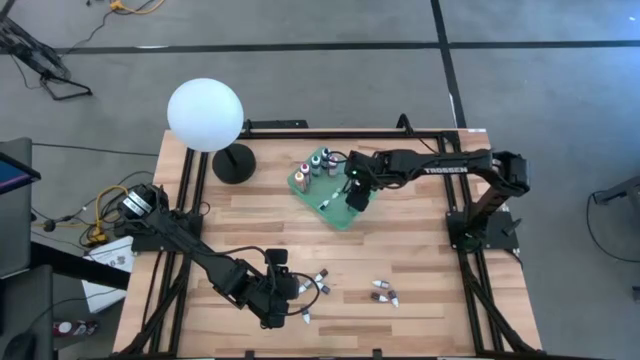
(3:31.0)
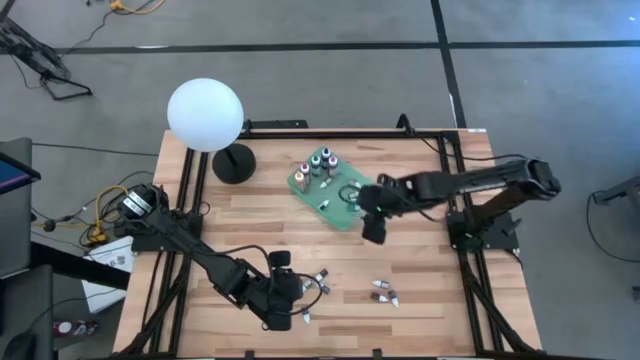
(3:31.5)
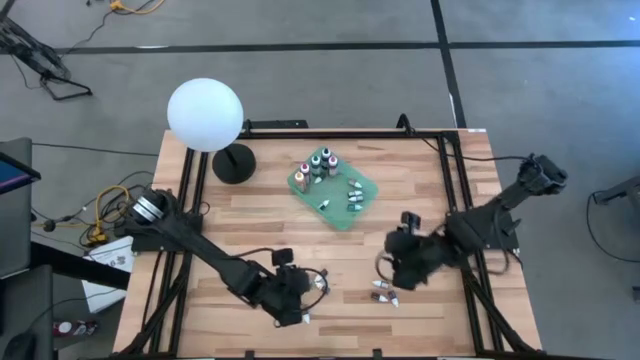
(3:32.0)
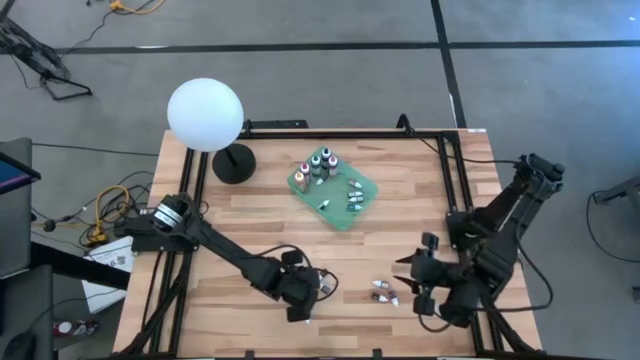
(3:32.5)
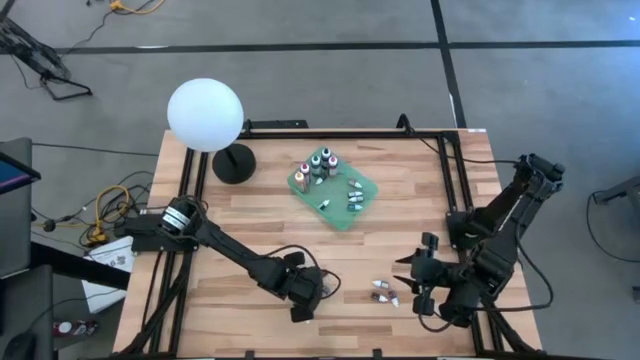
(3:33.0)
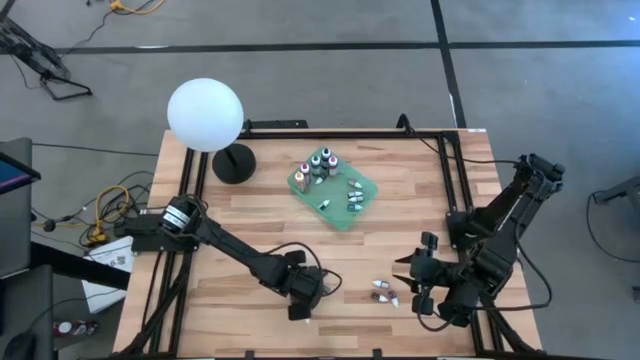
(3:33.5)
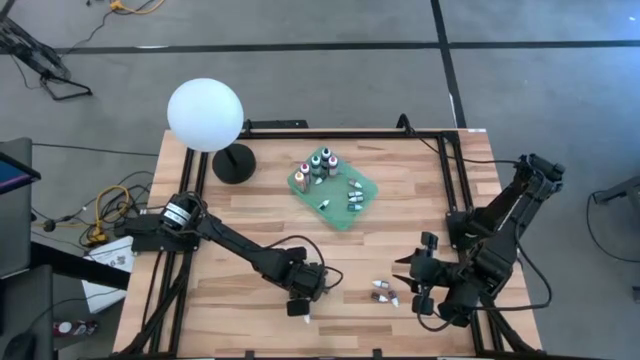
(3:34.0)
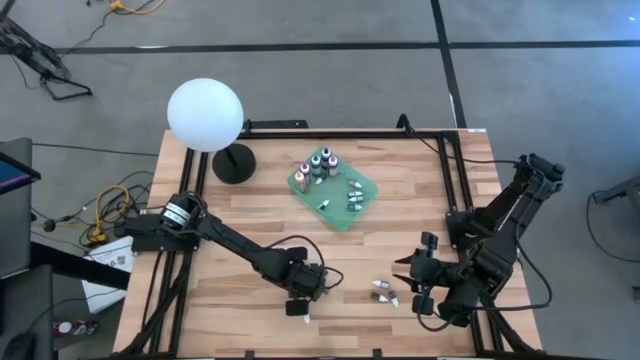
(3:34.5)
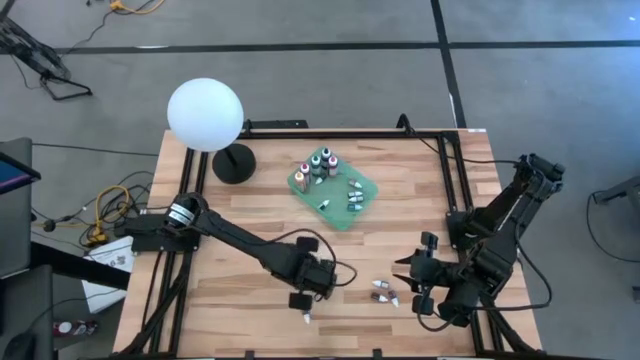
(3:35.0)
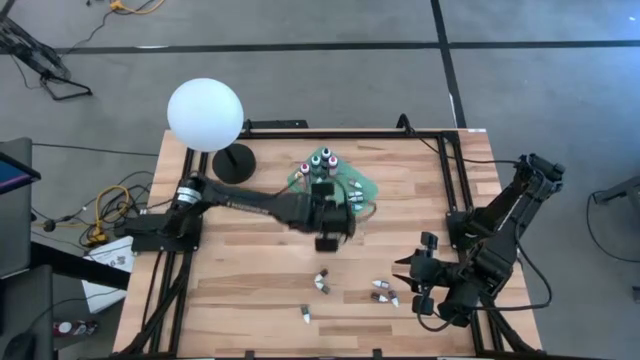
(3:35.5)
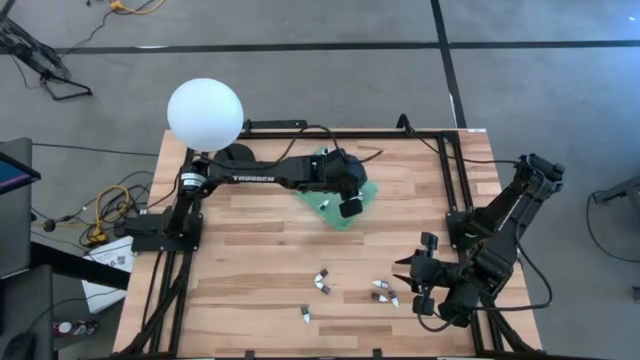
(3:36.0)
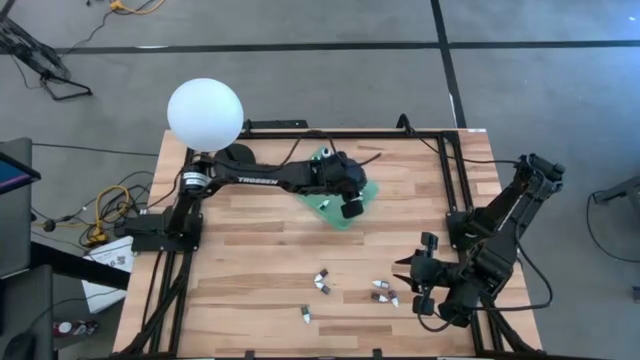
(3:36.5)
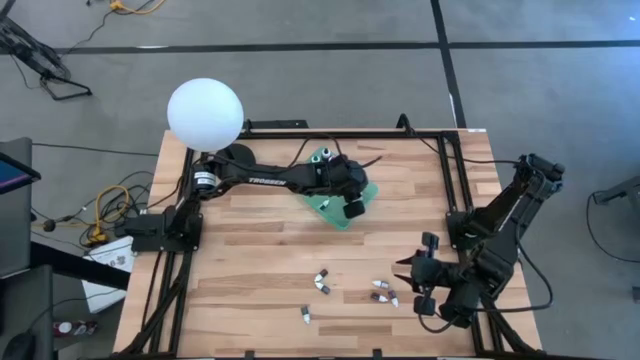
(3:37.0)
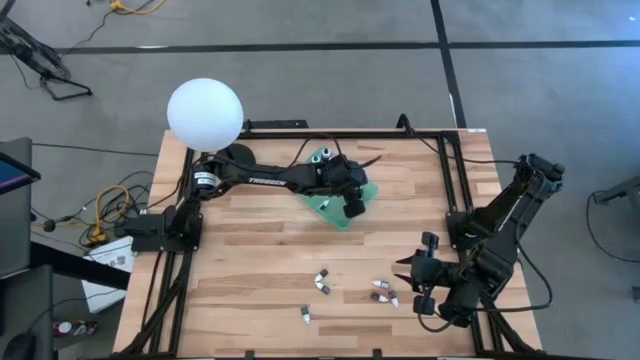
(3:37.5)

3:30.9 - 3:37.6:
Task: Pick & Place food coloring
Put the small green food coloring bottle into the green bin

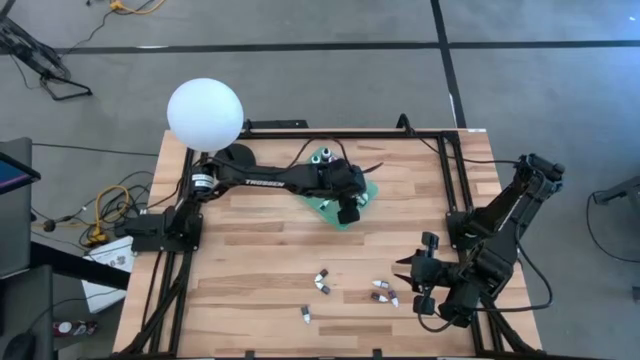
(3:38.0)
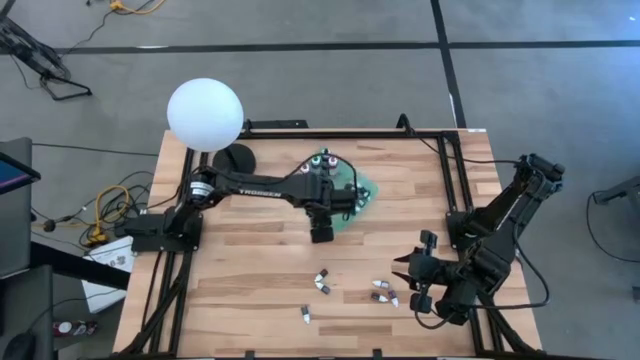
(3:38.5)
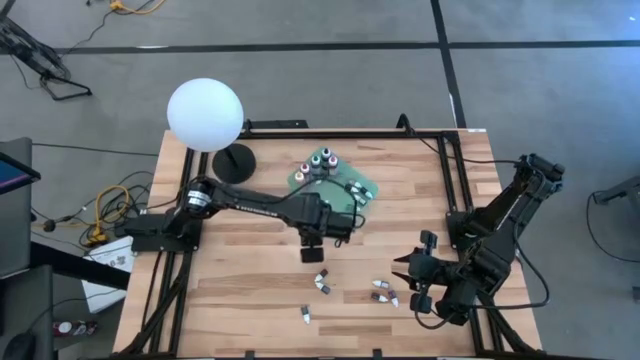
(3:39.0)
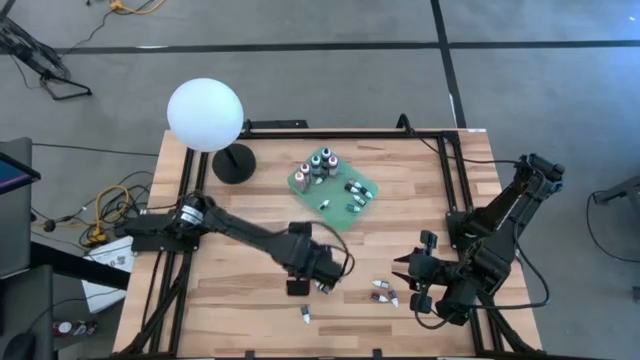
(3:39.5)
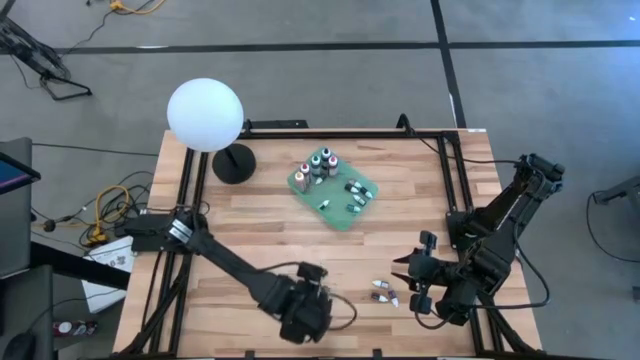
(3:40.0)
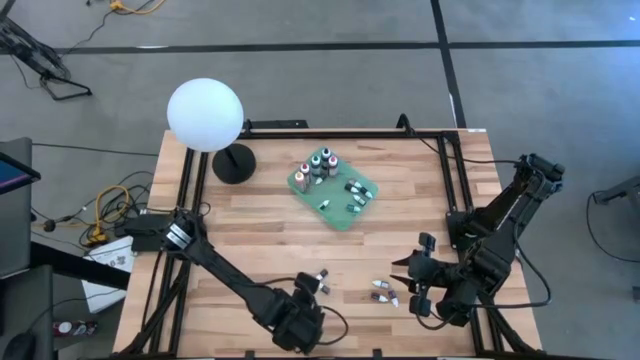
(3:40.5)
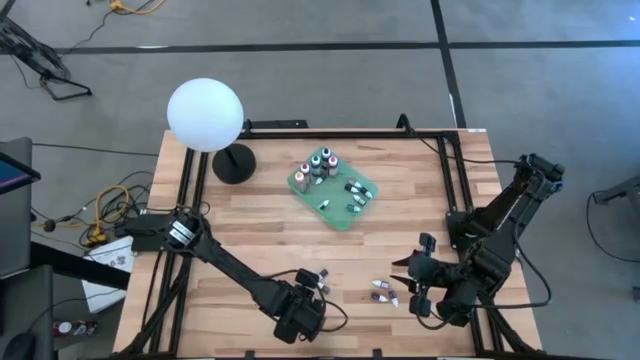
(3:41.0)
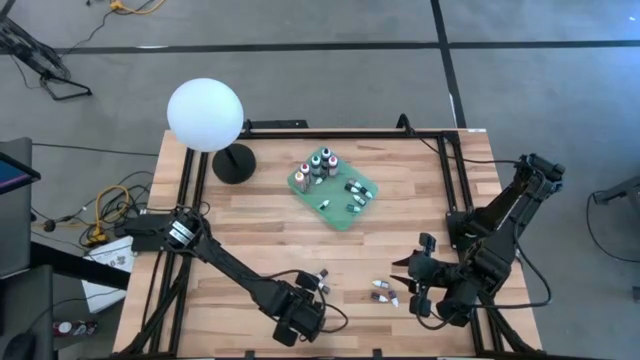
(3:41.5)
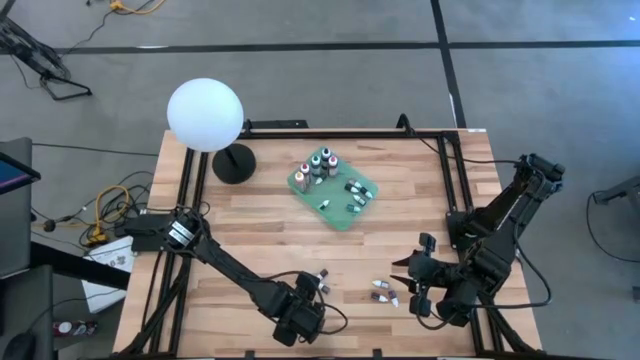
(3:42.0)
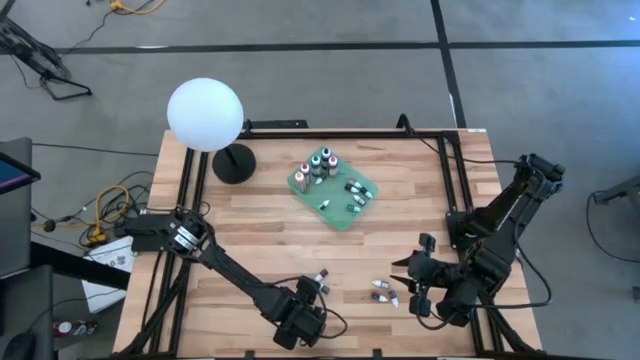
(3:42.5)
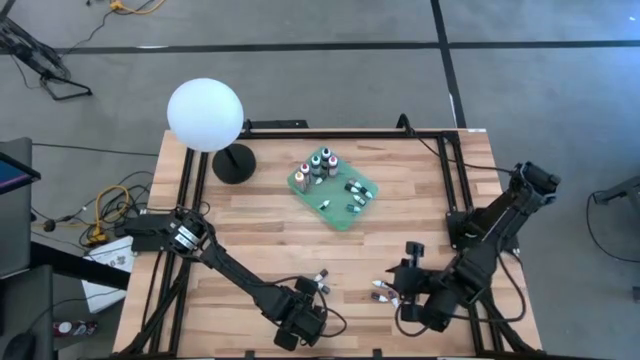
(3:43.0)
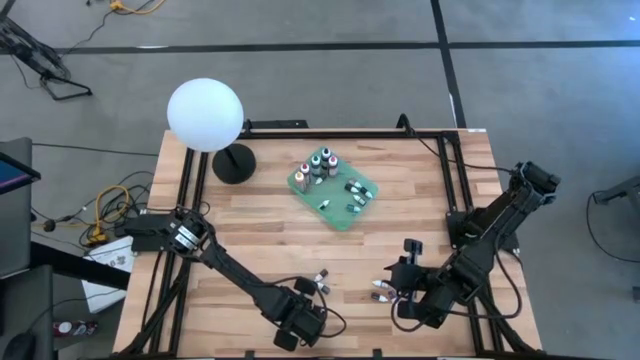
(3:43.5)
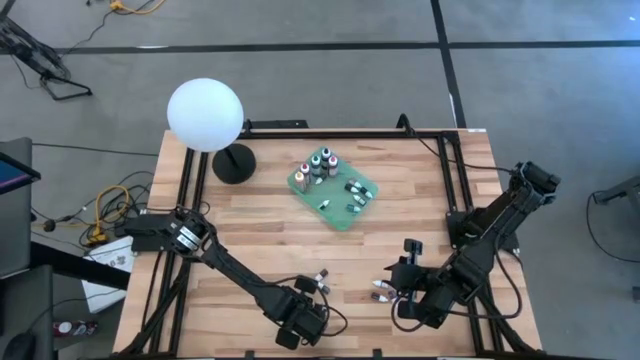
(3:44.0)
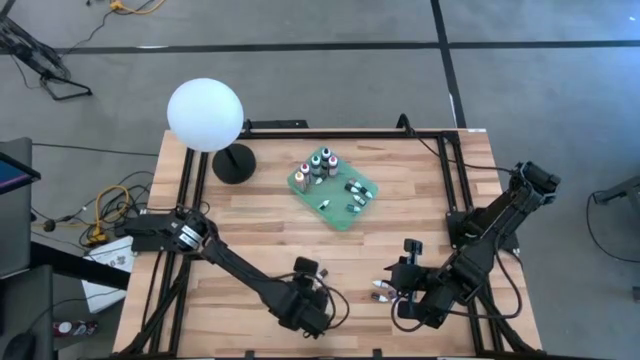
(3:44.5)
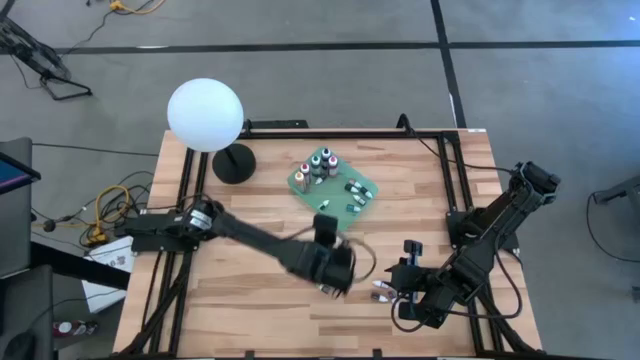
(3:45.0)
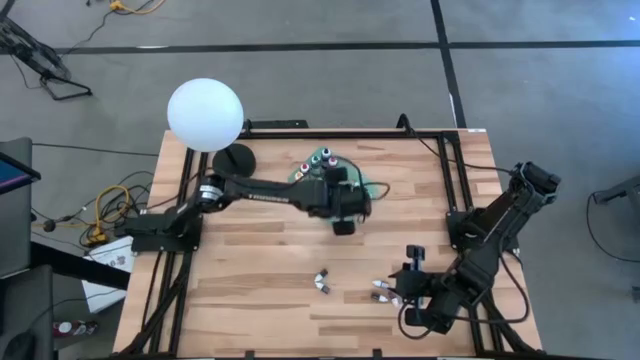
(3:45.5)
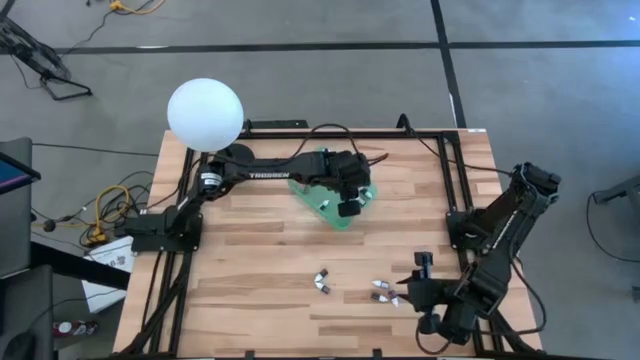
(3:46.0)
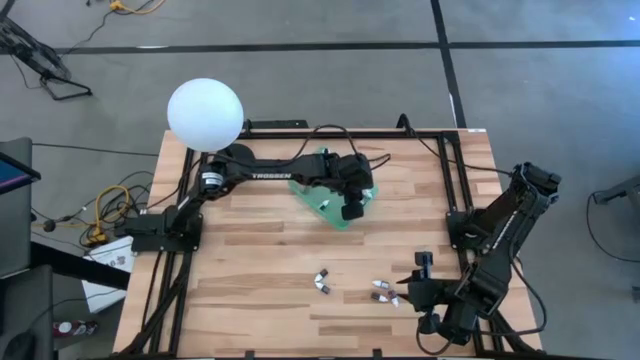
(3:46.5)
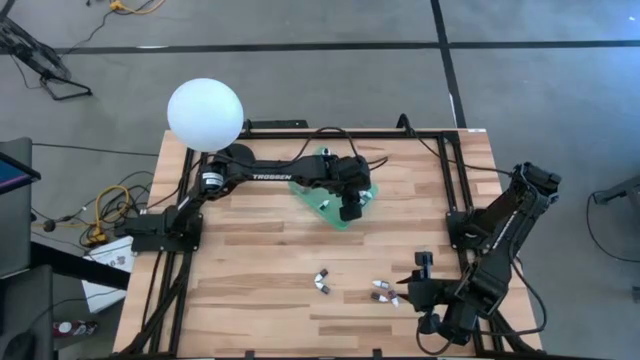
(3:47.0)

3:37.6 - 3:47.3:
Put the small black food coloring bottle into the green bin

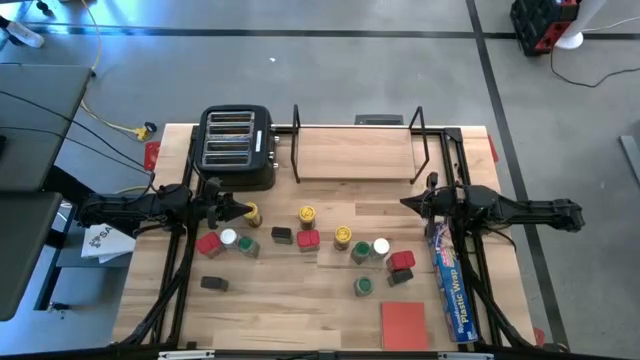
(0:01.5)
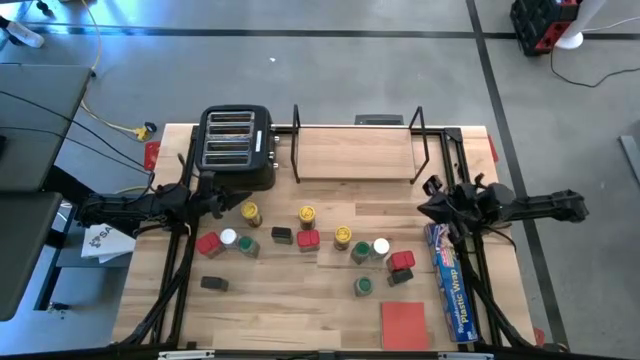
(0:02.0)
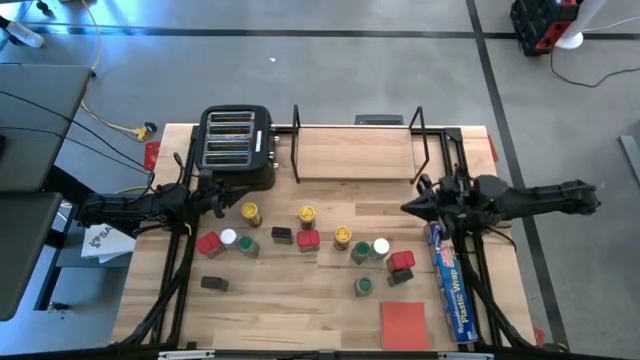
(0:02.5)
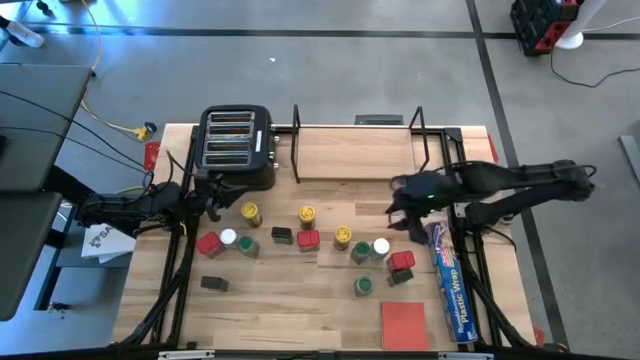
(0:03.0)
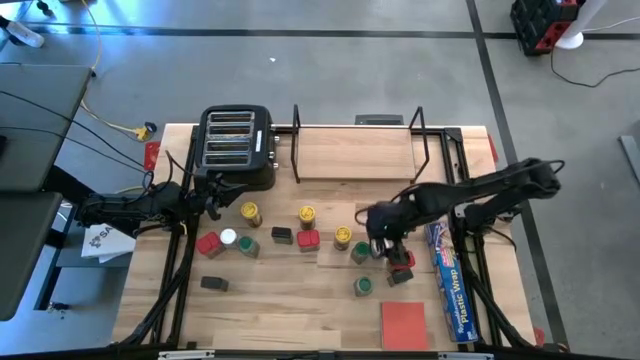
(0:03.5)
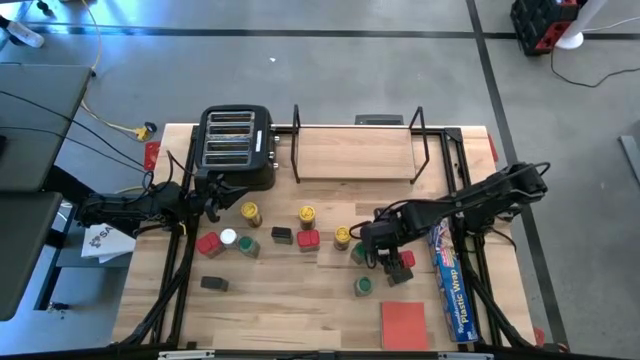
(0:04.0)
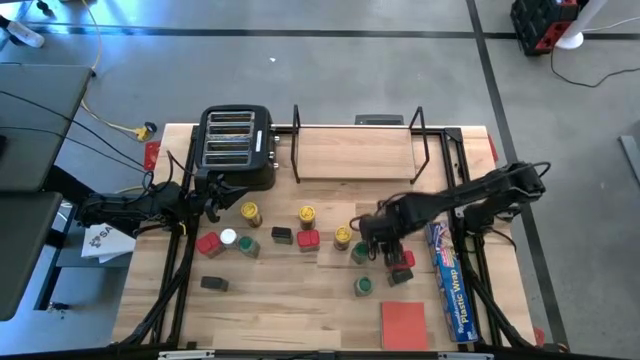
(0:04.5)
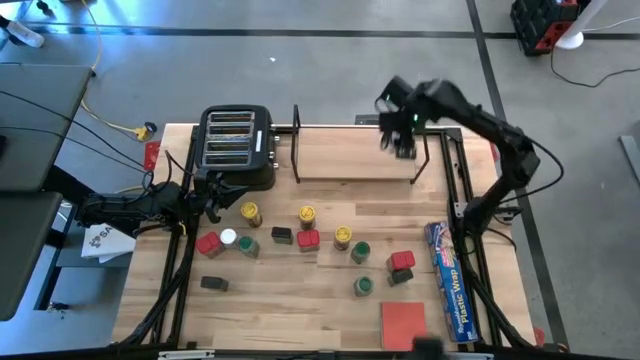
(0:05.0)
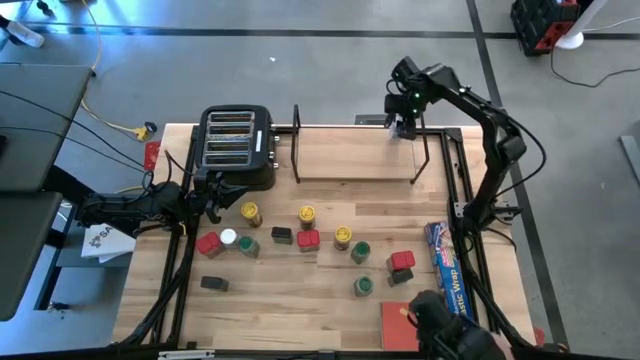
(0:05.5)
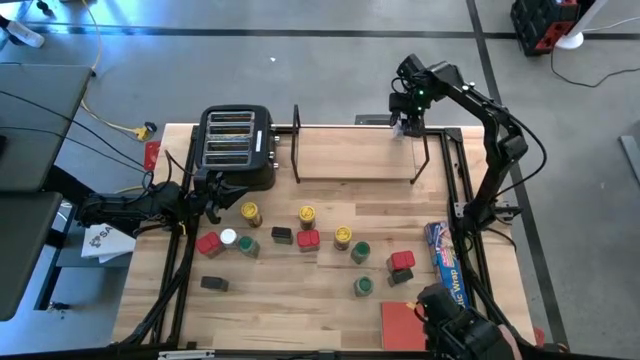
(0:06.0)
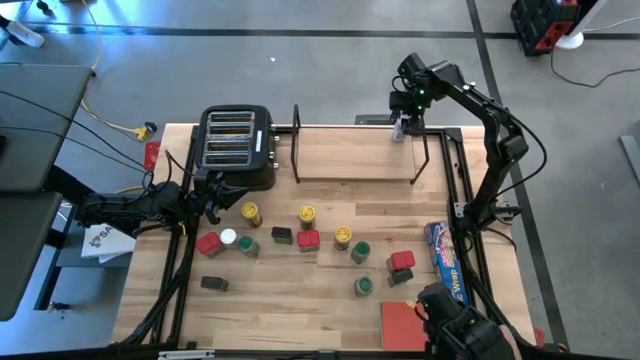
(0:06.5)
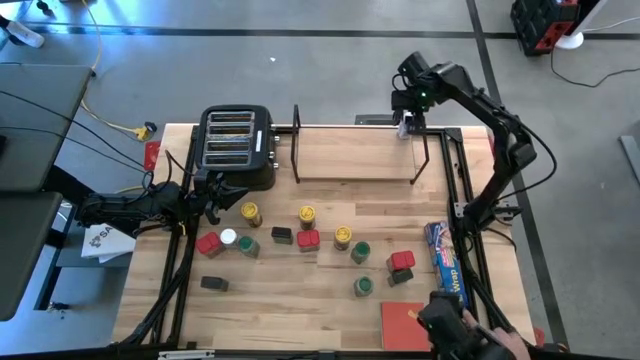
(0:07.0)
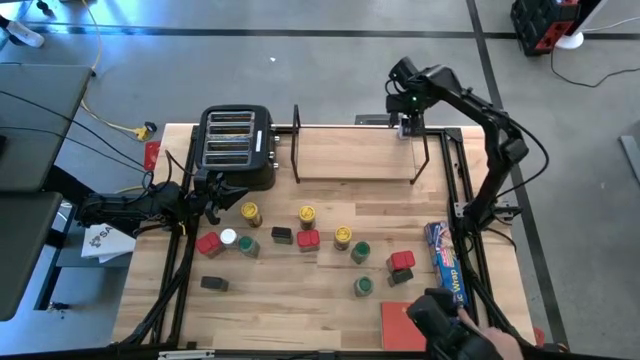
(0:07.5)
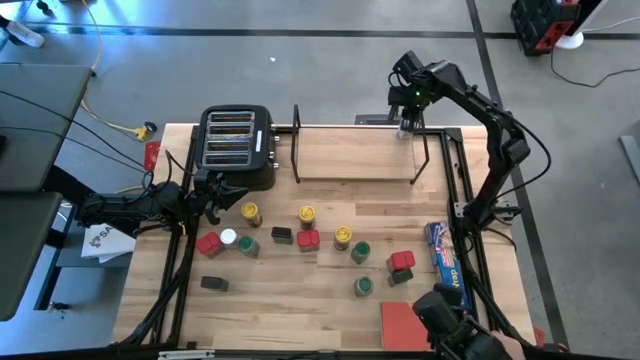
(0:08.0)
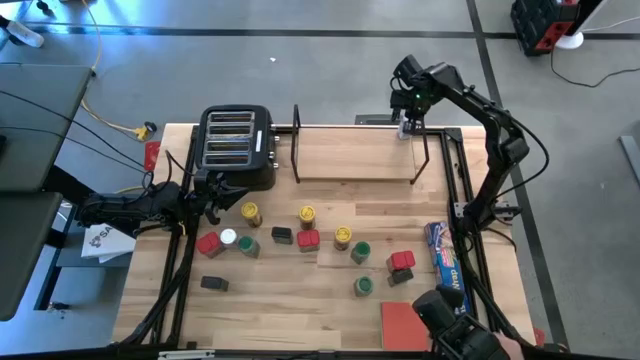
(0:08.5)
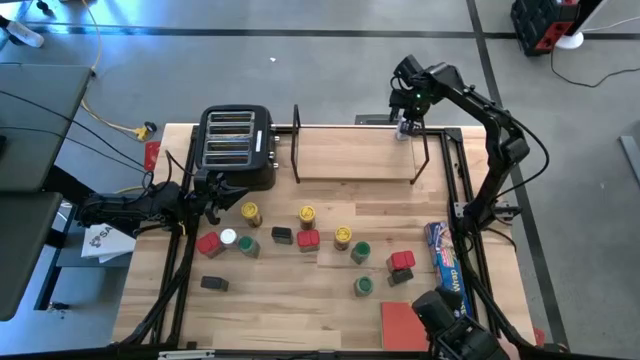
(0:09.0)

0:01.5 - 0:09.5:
Task: Shelf spices
Put the right white seasoning bottle on the shelf
